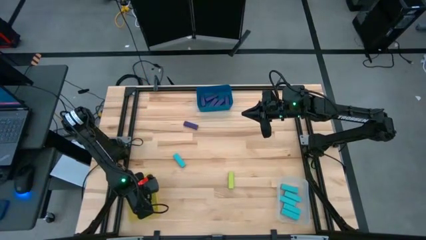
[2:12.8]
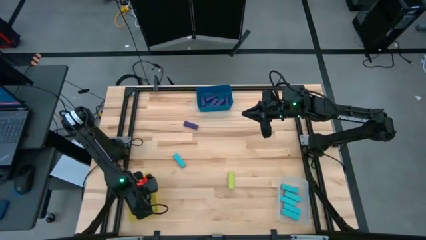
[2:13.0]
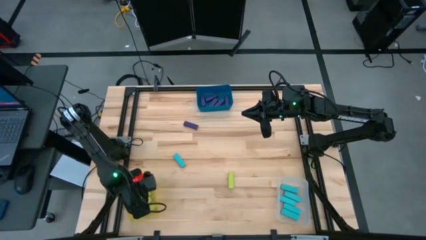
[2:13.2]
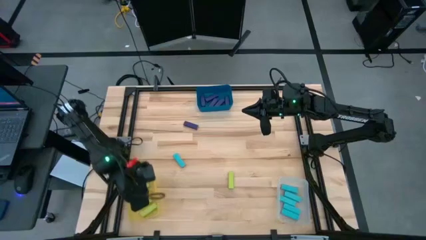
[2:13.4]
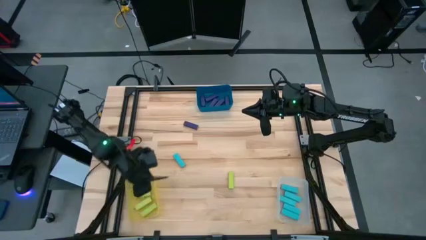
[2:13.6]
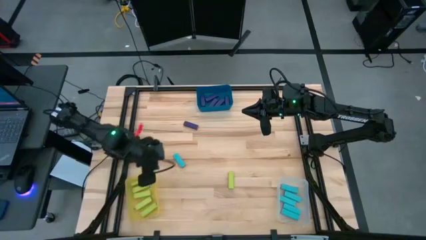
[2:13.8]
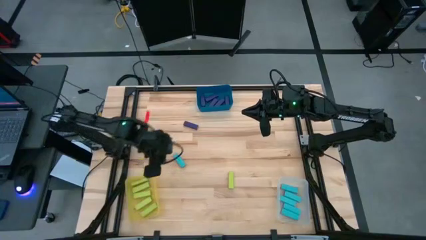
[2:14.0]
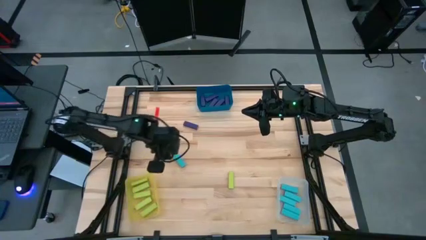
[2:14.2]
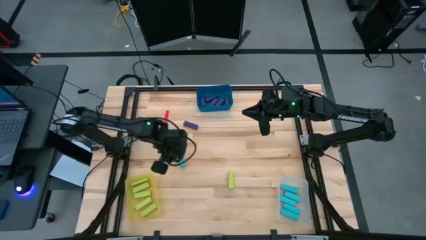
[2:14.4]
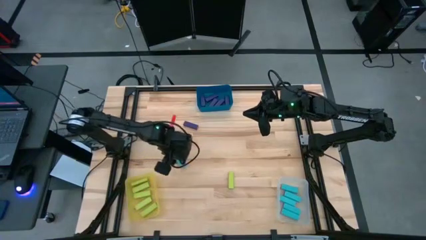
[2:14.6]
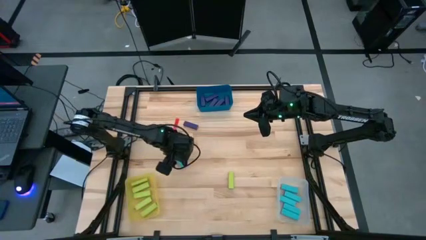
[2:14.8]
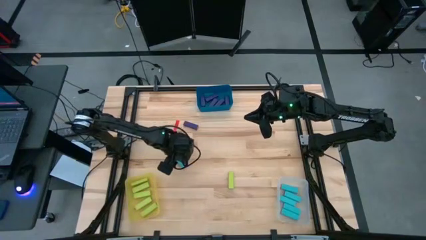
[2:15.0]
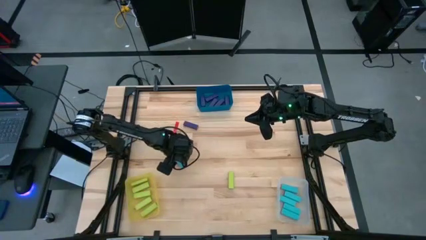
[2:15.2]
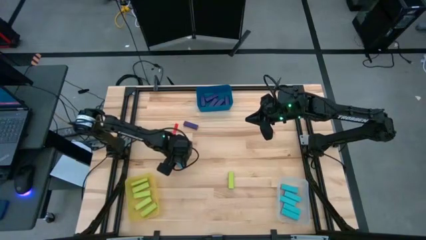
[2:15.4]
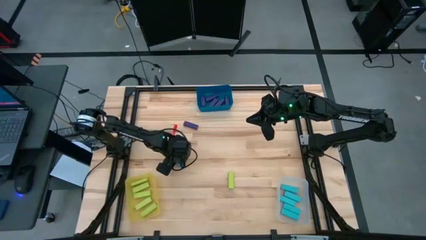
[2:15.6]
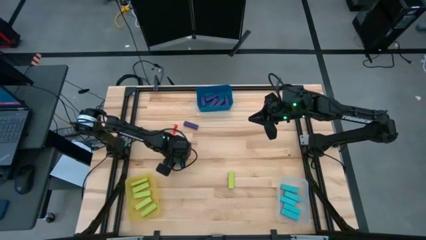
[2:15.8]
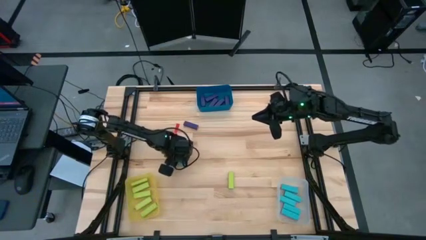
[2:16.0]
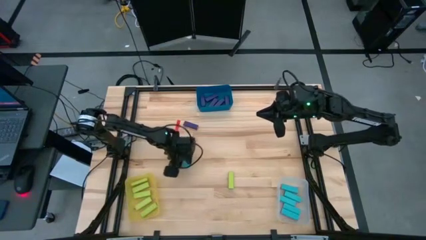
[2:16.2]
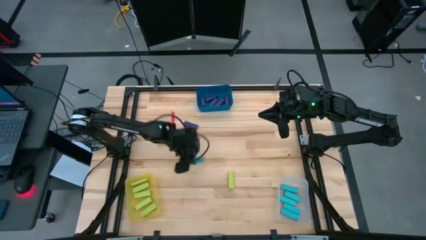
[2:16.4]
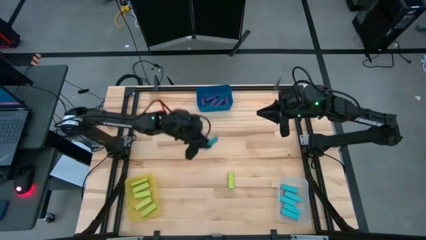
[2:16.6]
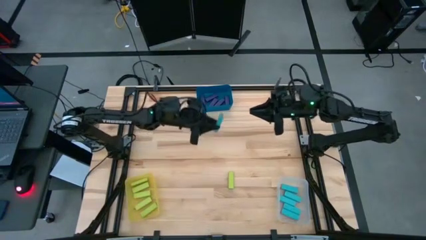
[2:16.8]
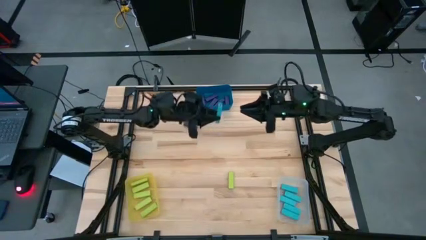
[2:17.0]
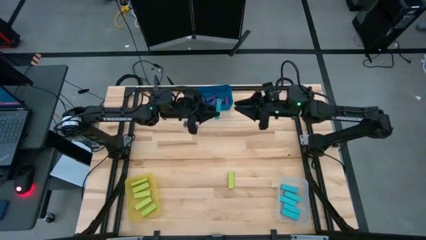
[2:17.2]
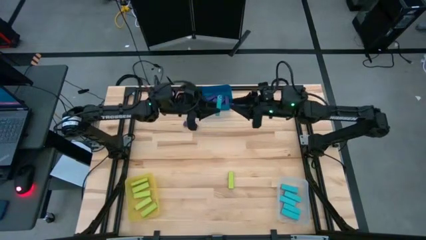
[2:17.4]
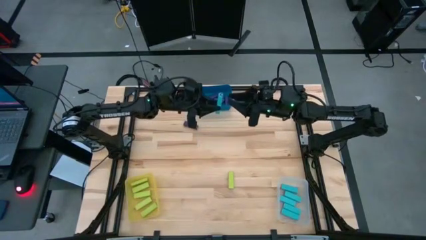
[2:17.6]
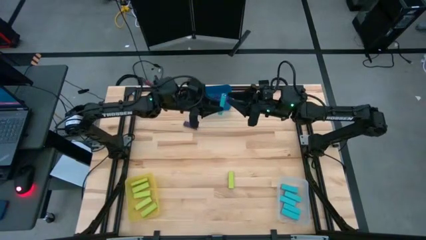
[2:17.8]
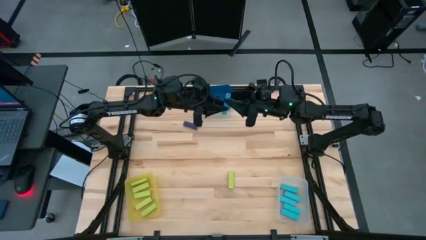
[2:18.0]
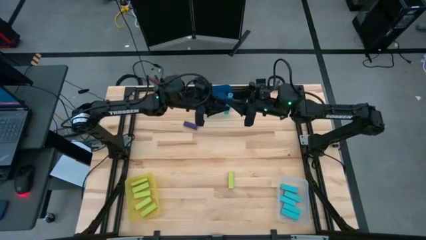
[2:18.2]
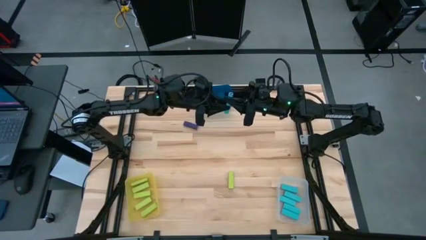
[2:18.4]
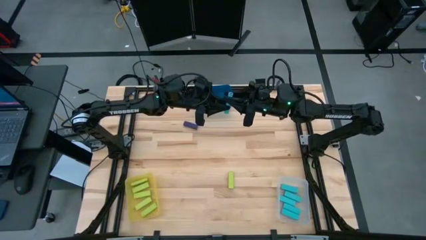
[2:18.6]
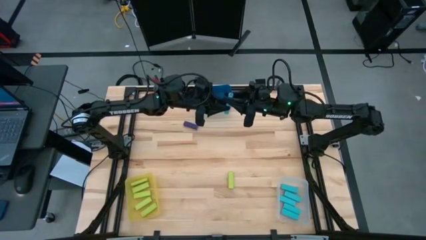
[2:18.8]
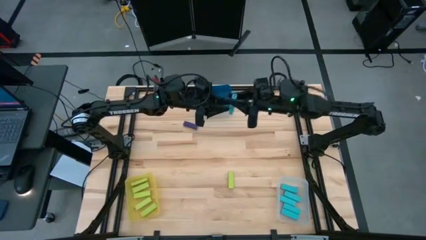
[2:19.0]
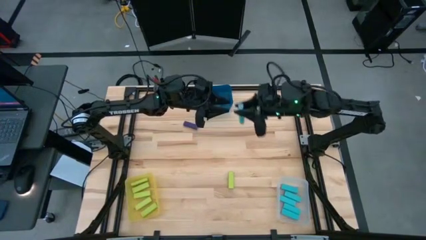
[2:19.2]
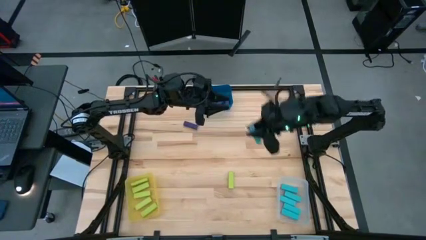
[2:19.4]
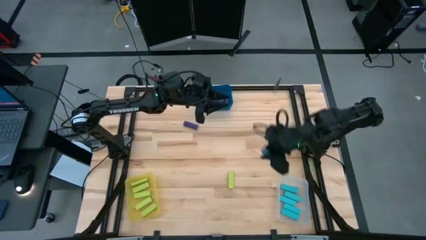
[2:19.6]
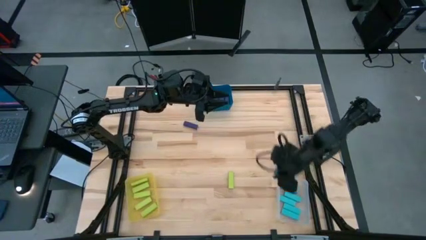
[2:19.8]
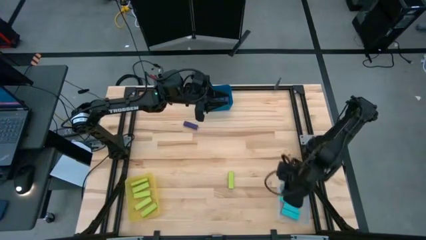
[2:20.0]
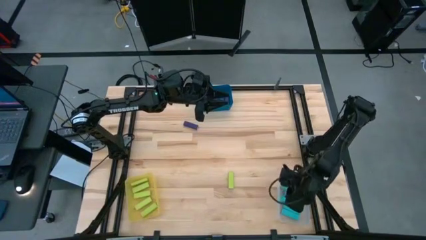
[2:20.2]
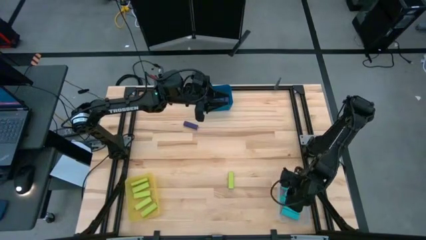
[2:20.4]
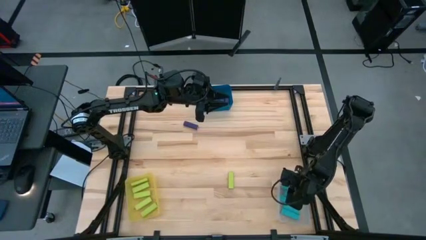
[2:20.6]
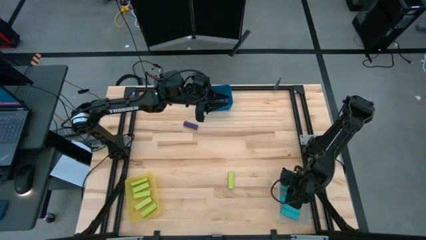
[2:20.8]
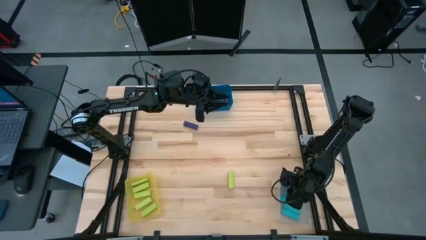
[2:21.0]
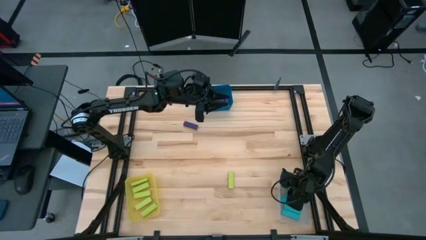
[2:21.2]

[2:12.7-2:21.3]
Task: Sort blocks
Put the sky blue block into the white bin

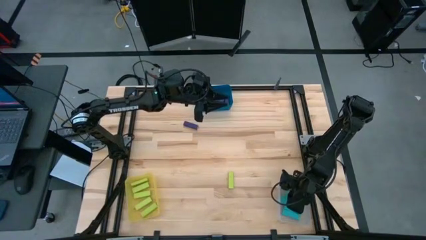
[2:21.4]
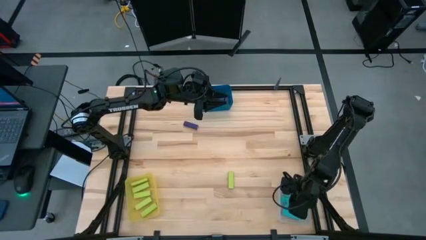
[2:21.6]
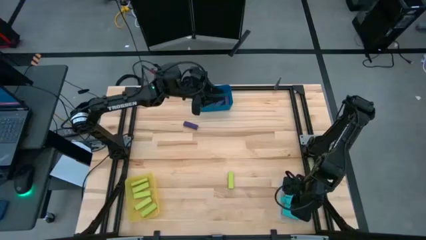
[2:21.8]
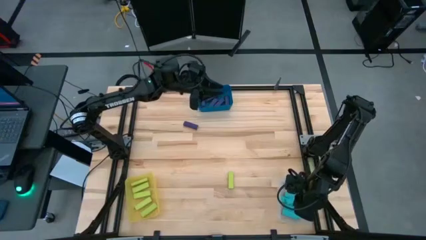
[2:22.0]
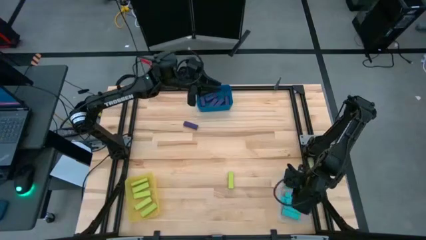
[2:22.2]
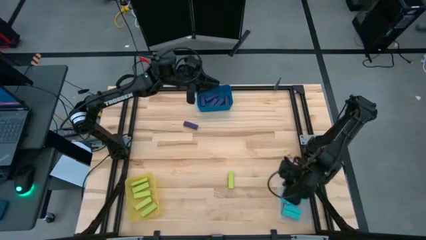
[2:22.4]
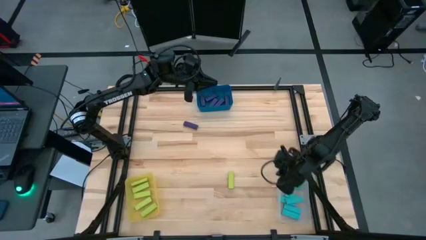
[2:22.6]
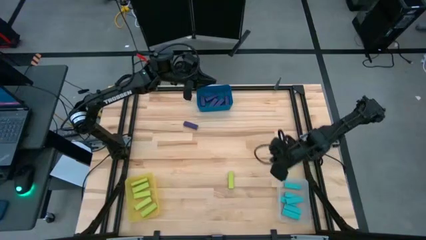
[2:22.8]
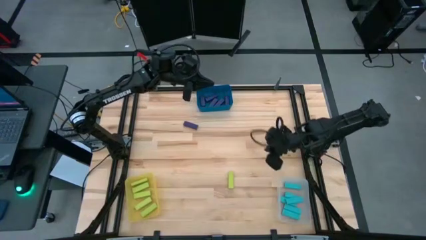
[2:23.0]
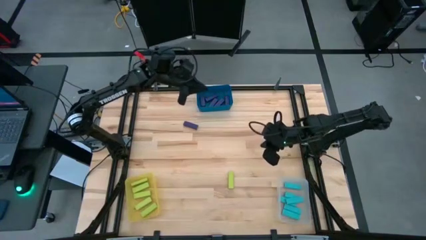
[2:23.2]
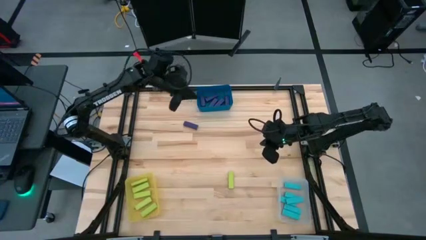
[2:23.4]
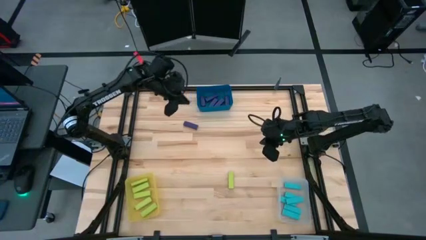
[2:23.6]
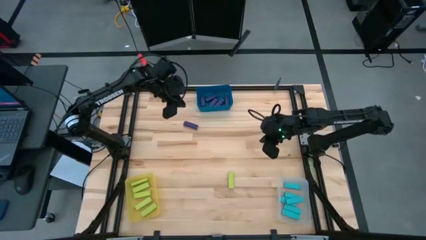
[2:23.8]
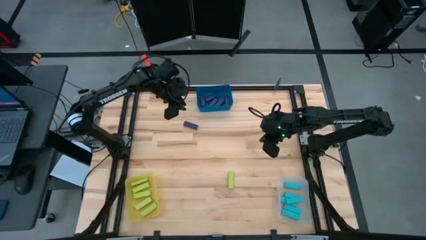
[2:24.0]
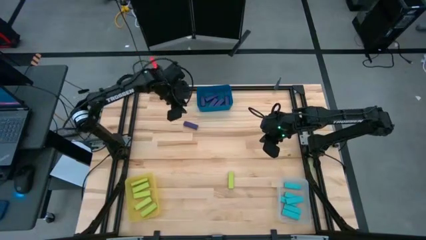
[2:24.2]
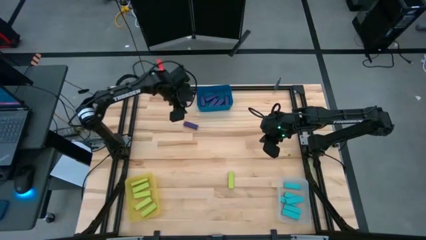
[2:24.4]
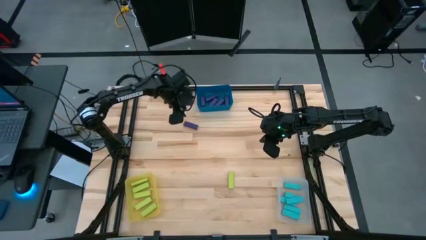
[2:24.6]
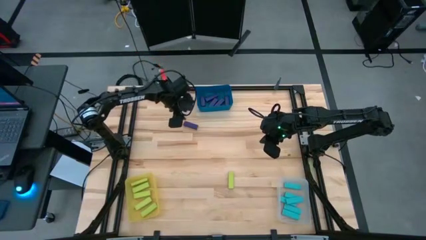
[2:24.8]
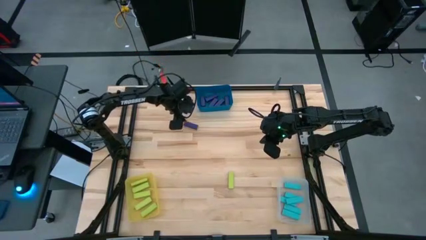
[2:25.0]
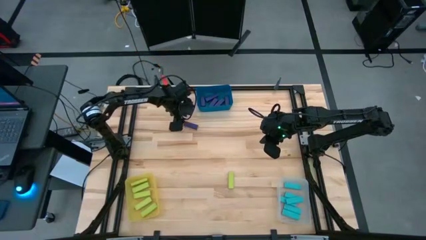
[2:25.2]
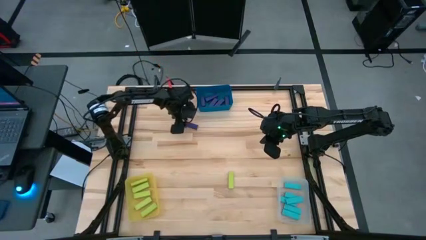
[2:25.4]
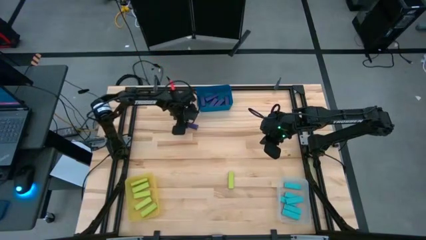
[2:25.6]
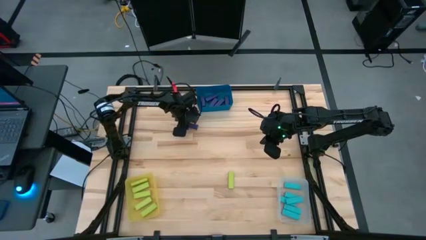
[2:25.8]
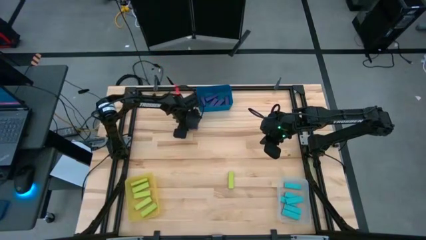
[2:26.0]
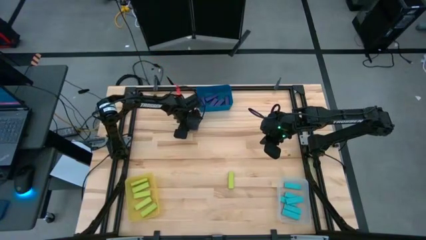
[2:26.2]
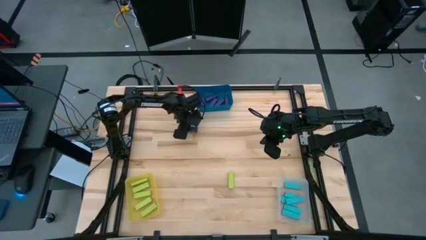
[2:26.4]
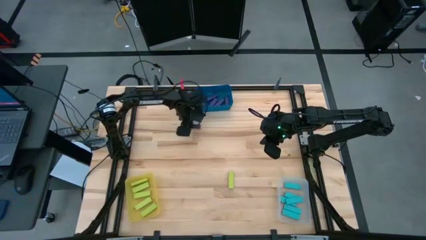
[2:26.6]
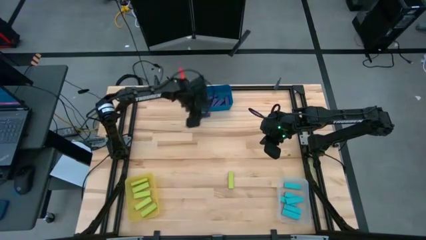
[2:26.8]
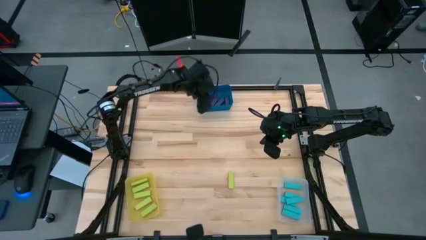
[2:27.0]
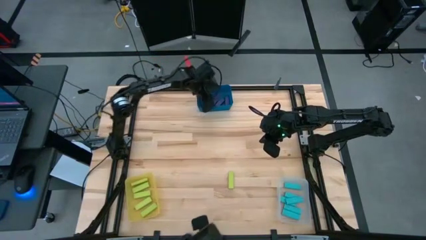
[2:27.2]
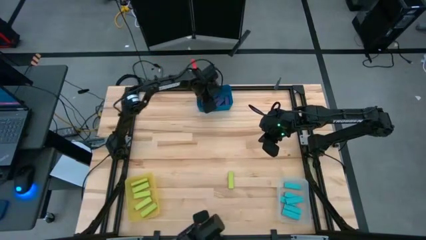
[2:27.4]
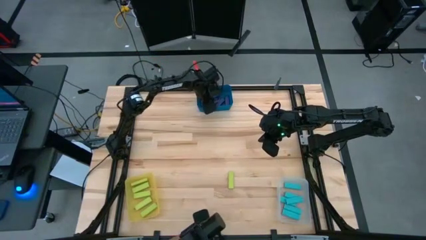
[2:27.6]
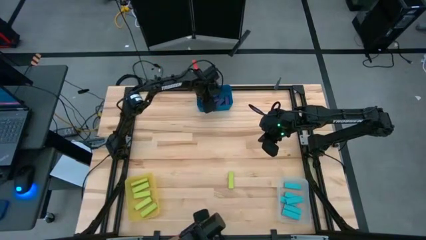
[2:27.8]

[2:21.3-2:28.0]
Put the purple block into the blue bin
